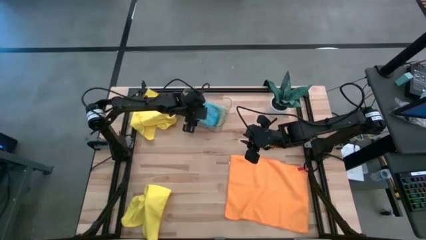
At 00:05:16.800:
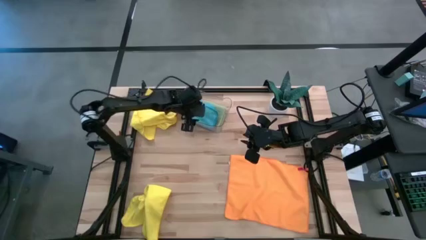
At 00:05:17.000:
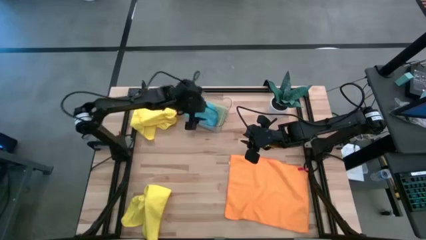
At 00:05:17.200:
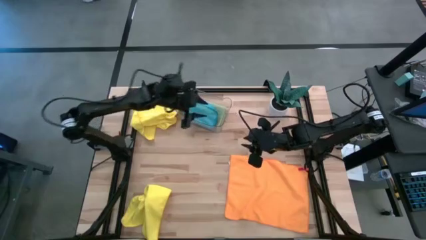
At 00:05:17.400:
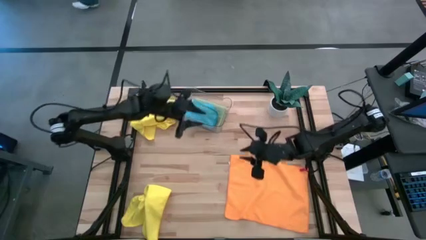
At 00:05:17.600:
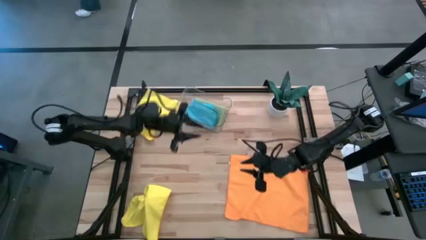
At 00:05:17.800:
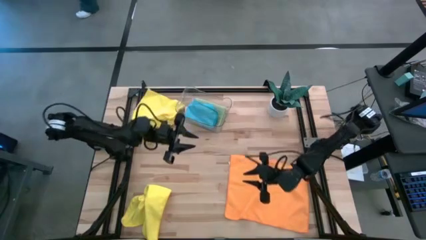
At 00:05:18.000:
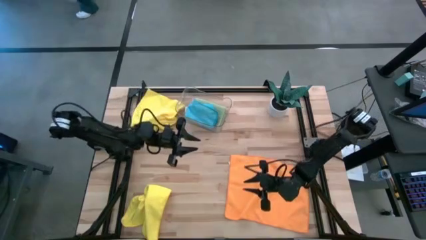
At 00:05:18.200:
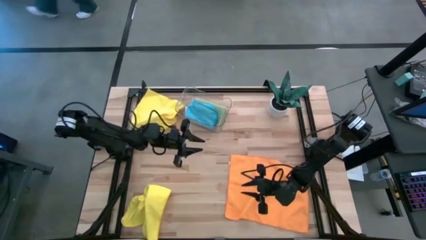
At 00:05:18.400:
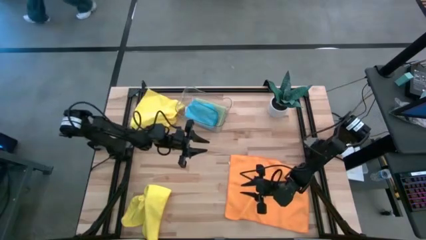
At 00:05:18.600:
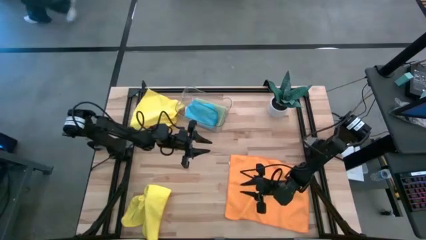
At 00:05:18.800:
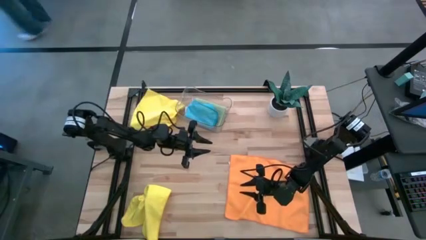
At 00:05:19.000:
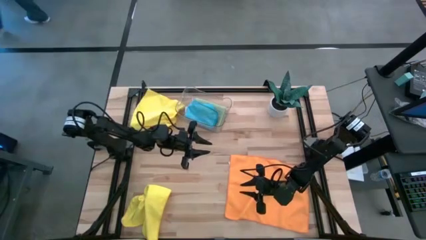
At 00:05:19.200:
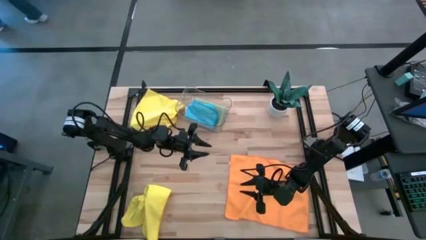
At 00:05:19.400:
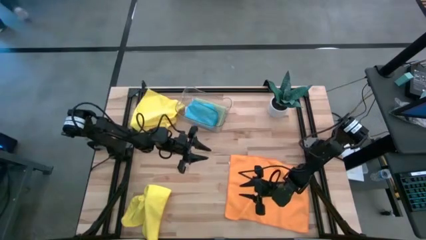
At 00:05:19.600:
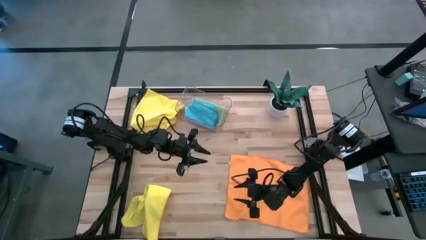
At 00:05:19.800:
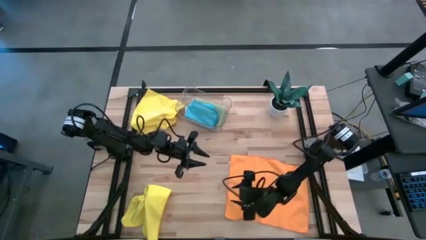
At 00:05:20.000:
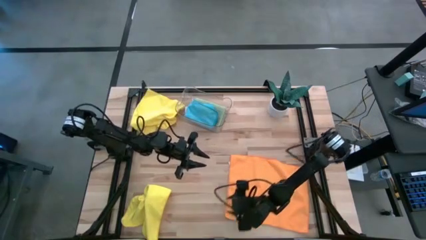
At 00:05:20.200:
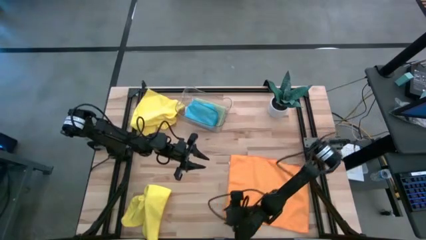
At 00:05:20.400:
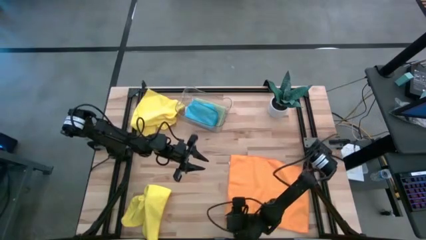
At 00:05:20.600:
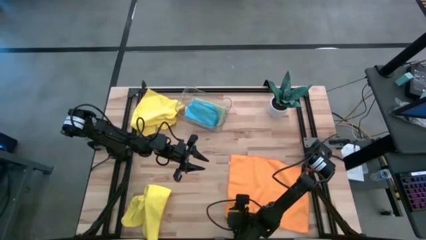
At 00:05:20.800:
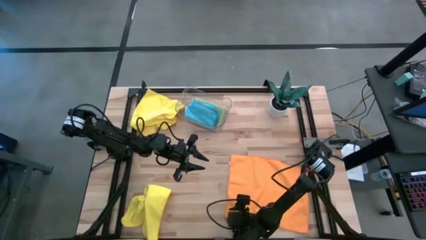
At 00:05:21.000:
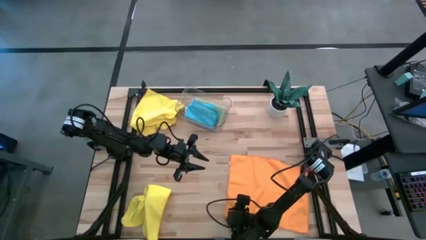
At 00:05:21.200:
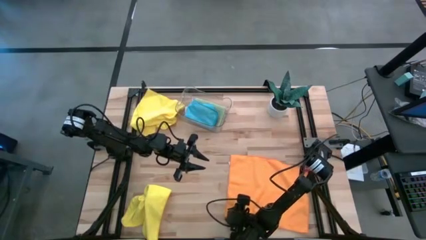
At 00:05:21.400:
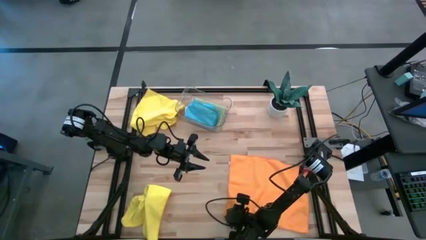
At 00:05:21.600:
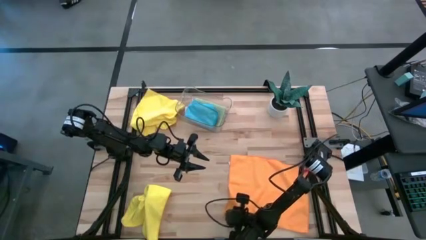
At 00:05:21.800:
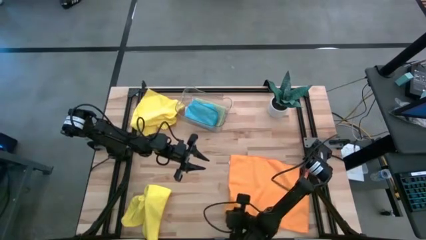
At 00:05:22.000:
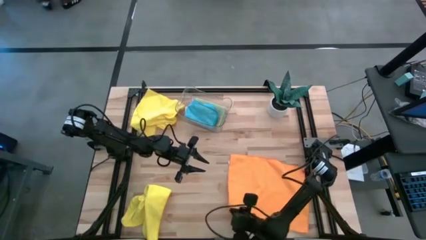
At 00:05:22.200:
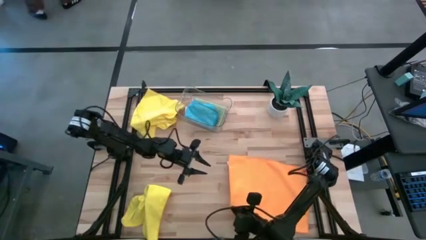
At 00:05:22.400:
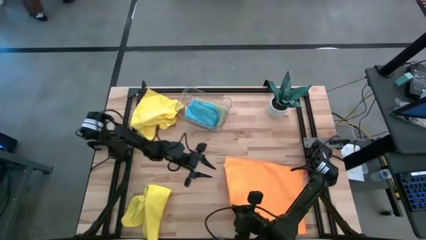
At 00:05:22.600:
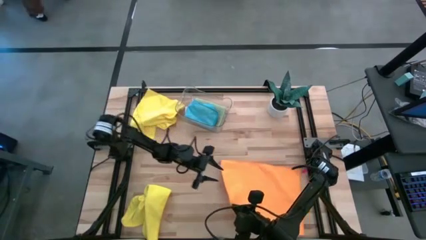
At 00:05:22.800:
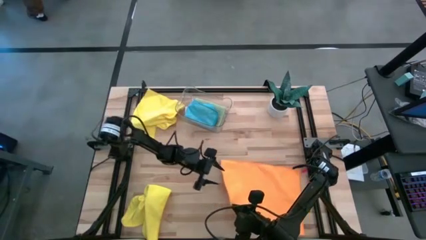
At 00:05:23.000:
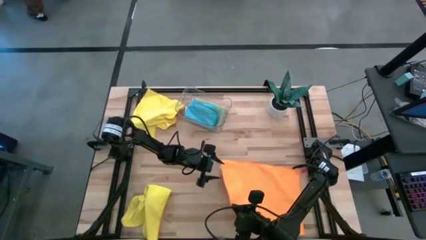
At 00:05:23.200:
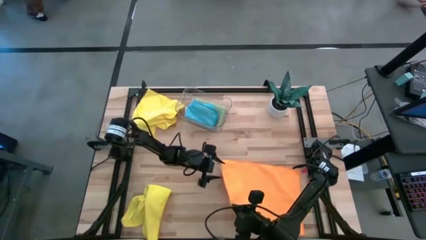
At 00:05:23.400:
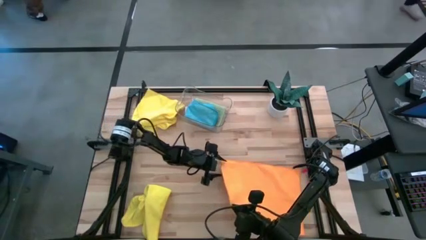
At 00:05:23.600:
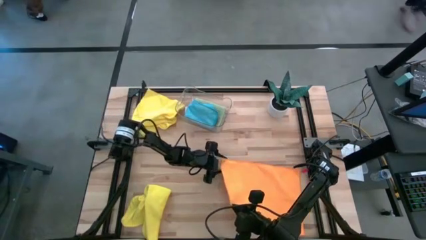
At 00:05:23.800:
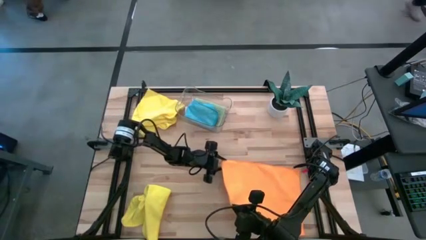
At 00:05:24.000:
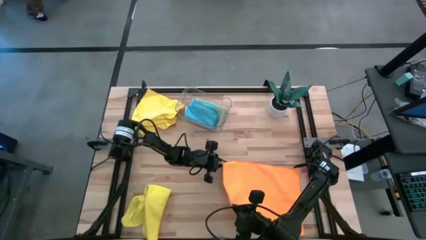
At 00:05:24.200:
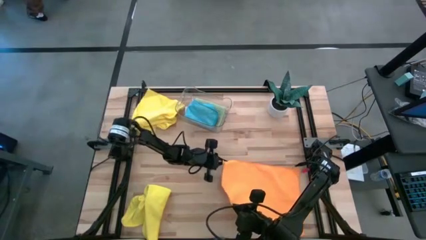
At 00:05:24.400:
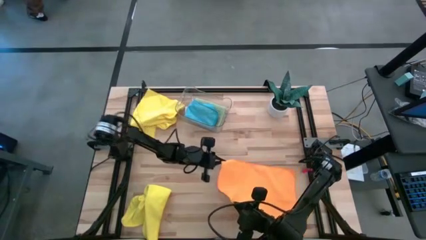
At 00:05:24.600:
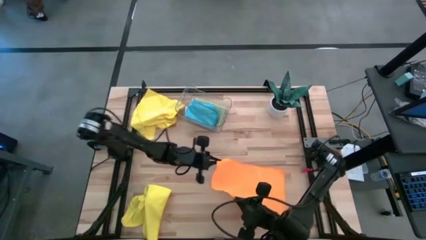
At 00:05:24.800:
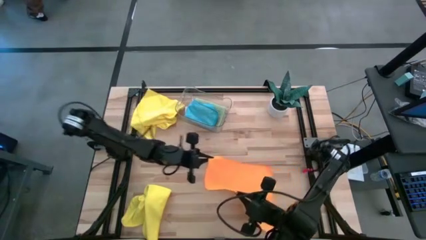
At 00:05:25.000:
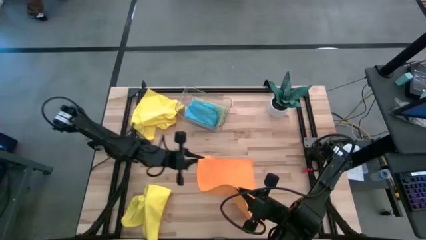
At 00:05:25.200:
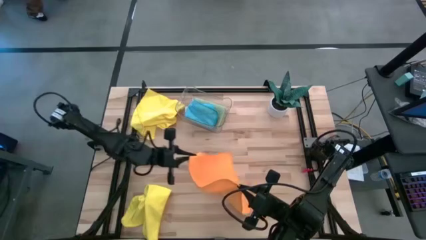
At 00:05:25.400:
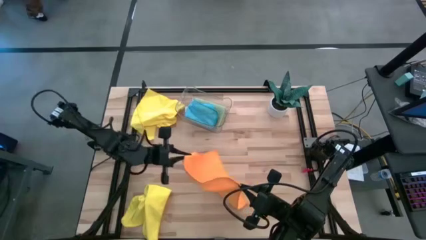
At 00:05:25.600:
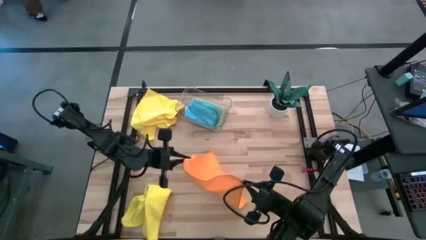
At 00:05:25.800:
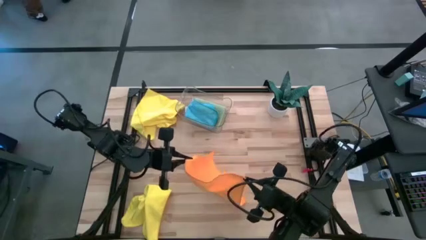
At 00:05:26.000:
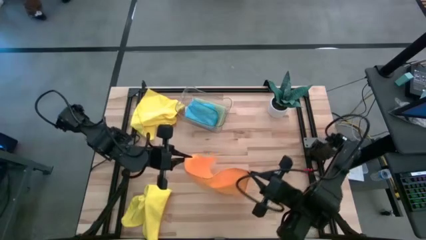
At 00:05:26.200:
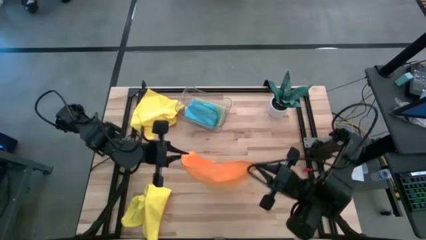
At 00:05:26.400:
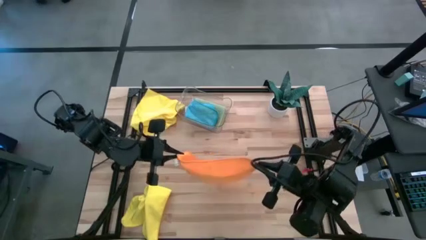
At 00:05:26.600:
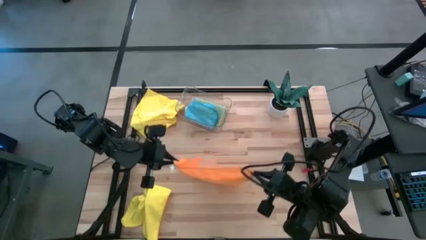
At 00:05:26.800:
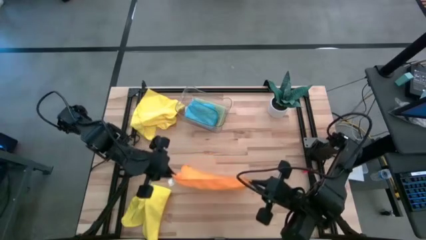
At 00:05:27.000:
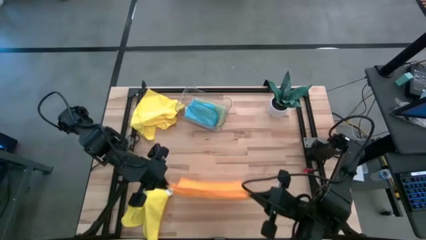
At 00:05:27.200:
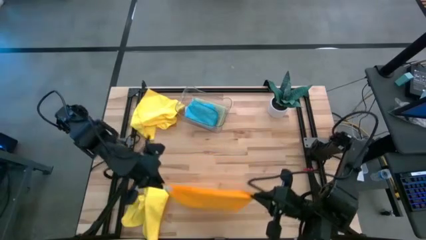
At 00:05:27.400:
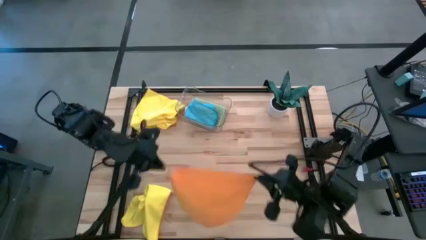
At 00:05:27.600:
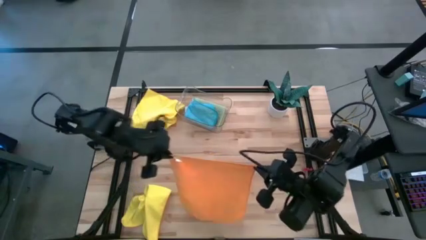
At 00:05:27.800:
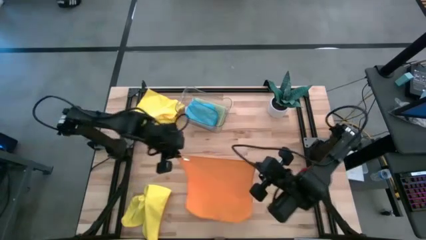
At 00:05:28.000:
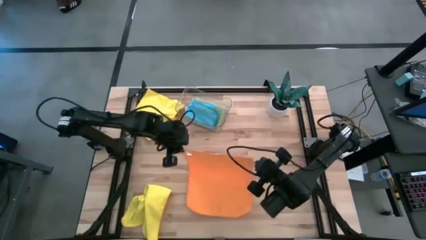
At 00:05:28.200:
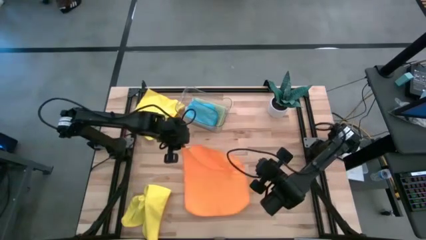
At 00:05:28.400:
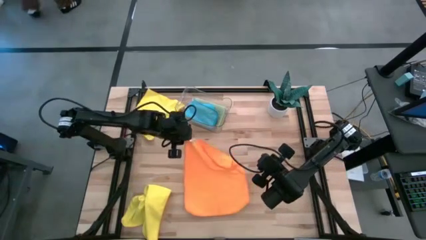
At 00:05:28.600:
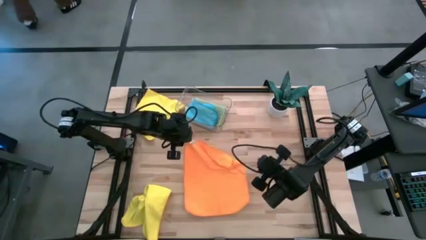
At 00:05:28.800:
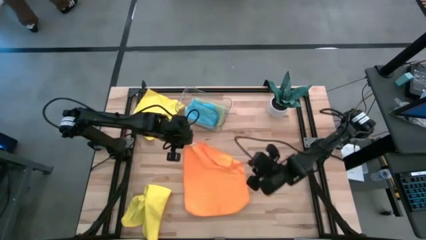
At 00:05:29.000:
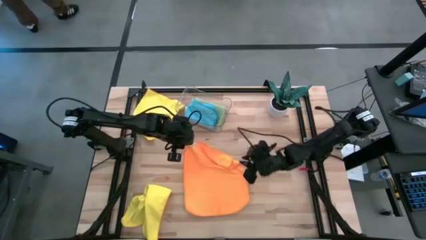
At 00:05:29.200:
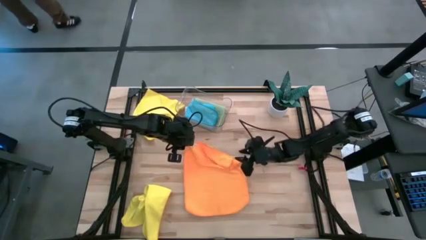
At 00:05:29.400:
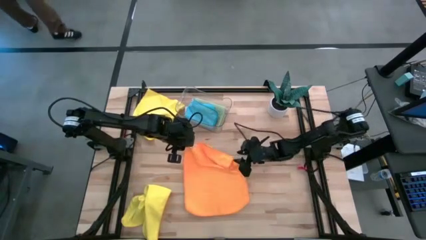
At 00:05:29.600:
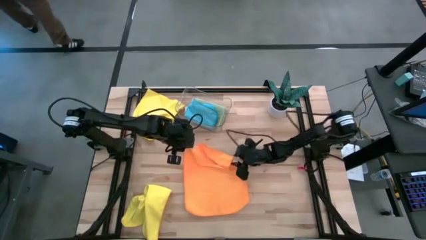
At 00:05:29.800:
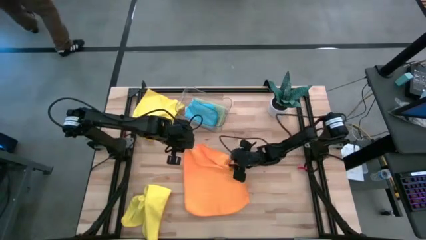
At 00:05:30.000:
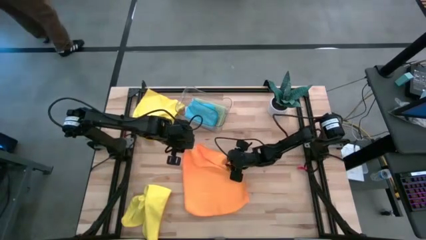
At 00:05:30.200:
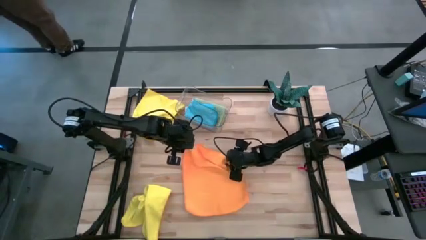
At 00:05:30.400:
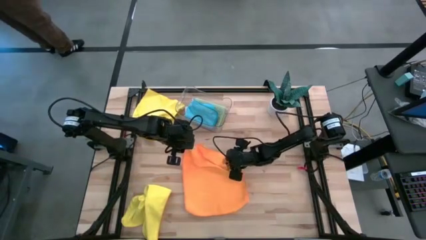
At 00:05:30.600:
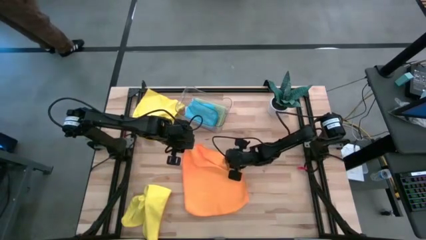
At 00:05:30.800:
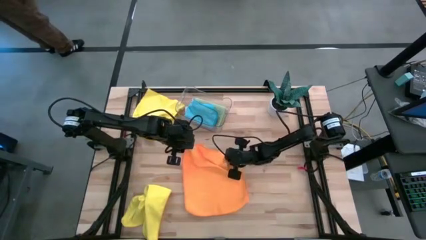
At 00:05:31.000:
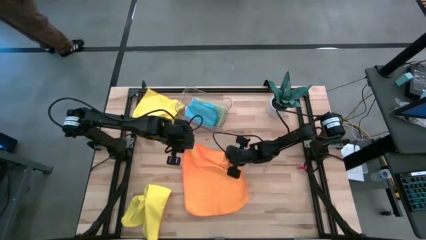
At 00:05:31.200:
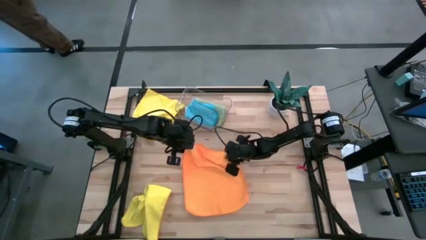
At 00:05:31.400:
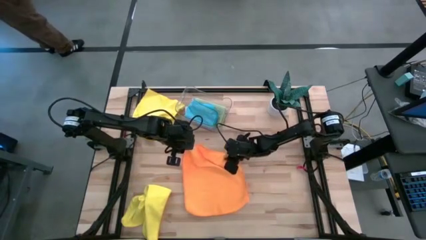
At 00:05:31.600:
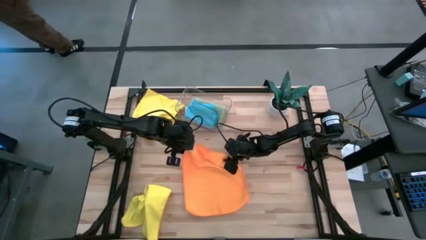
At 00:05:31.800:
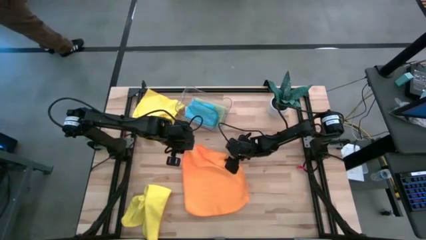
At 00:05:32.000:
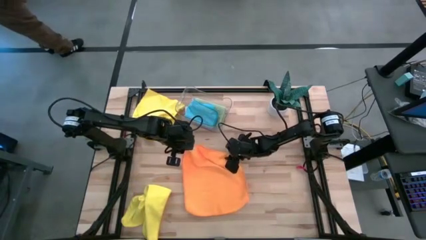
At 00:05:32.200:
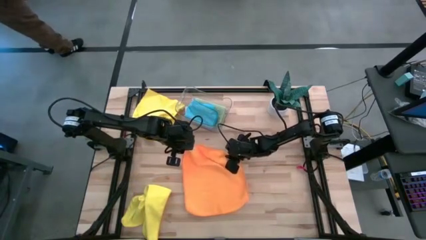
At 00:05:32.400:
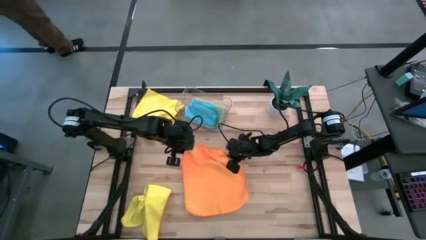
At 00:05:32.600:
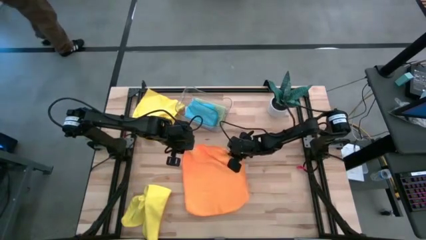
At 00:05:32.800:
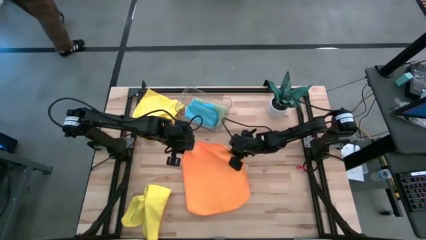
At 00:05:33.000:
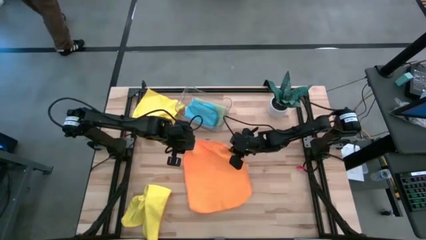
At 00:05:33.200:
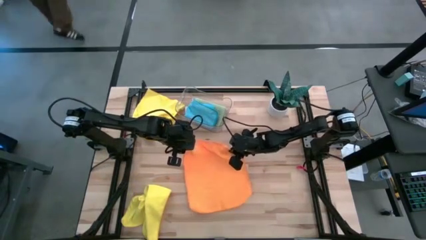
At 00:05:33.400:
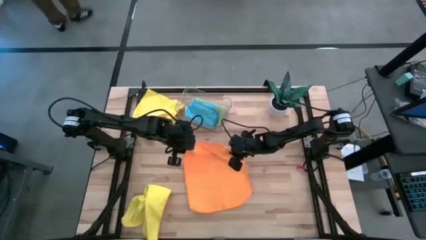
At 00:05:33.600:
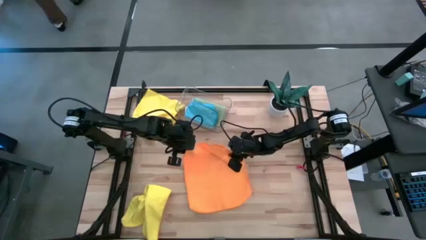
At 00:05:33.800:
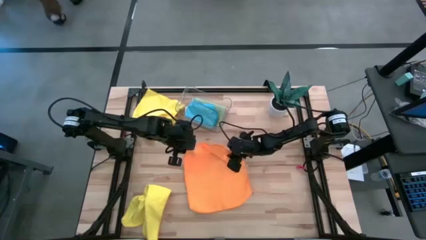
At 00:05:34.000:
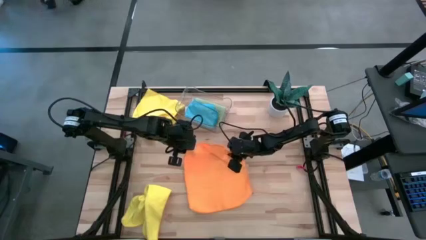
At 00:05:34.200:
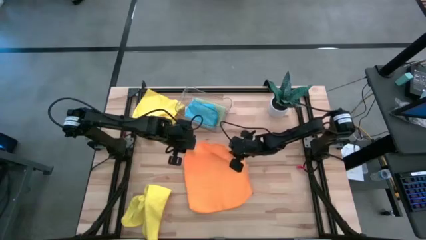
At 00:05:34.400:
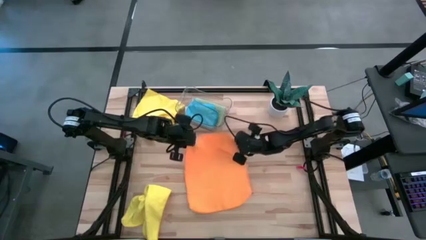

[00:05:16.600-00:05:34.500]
Task: Fold microfiber towels
Fold the orange towel
